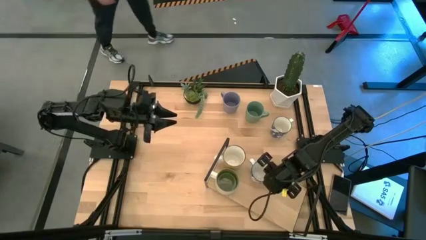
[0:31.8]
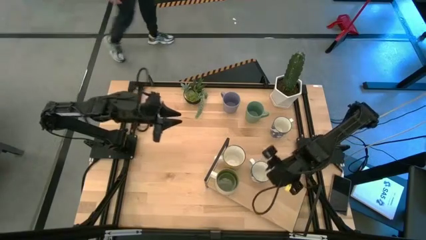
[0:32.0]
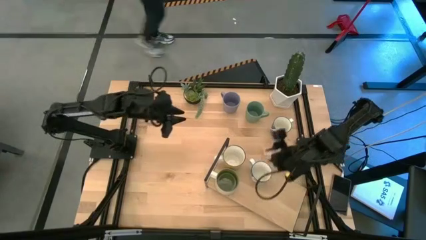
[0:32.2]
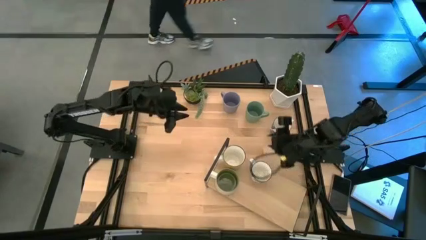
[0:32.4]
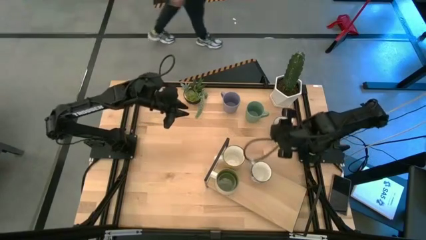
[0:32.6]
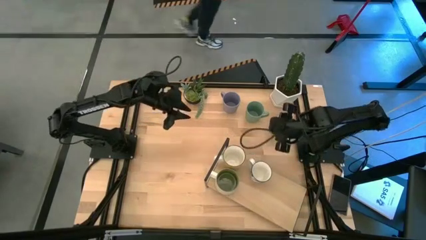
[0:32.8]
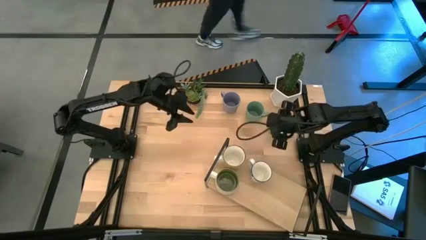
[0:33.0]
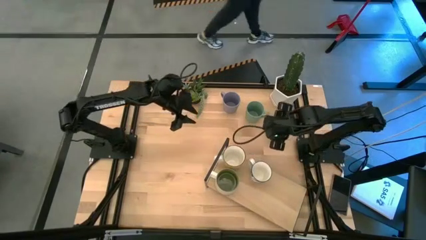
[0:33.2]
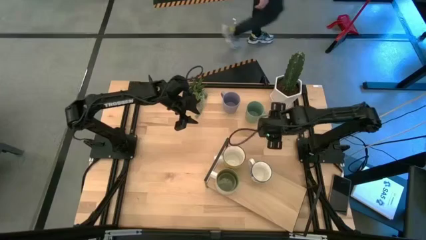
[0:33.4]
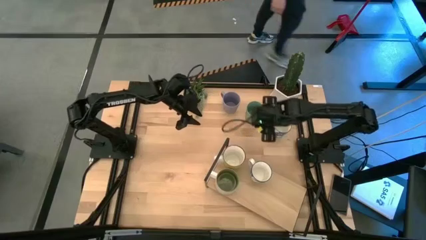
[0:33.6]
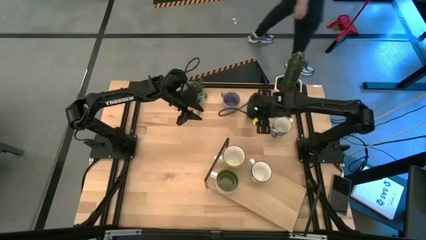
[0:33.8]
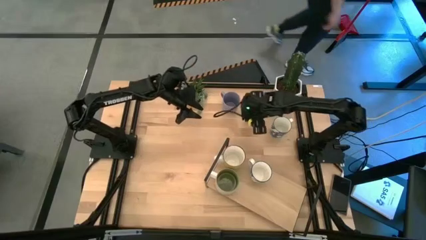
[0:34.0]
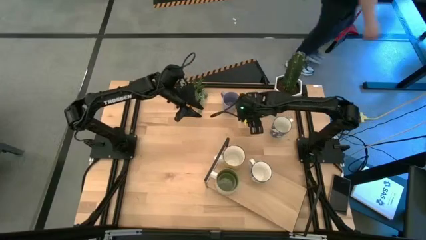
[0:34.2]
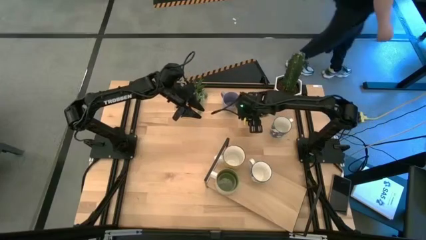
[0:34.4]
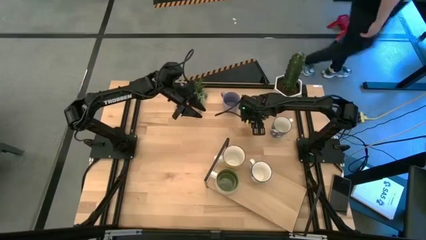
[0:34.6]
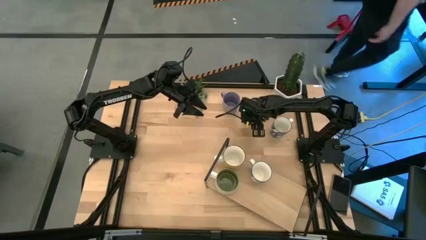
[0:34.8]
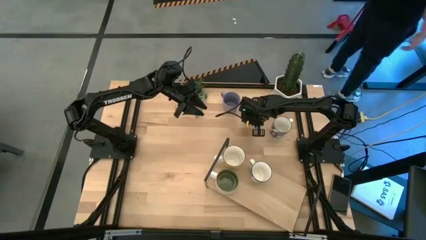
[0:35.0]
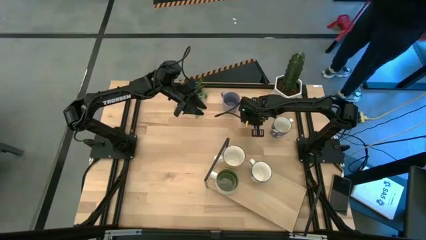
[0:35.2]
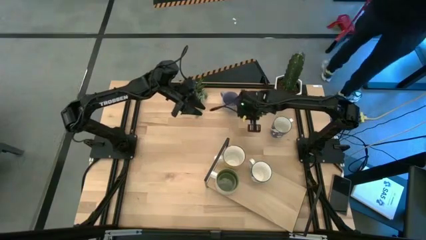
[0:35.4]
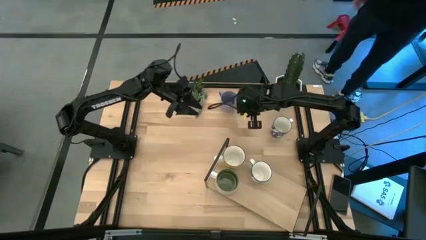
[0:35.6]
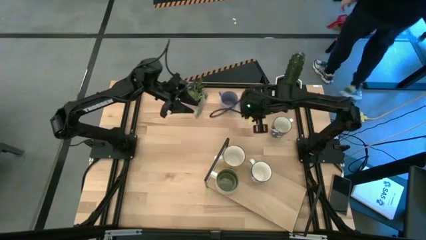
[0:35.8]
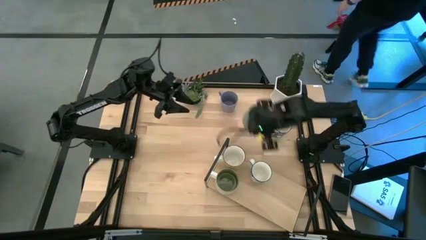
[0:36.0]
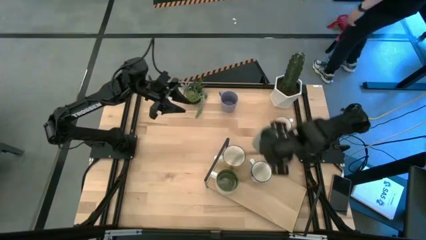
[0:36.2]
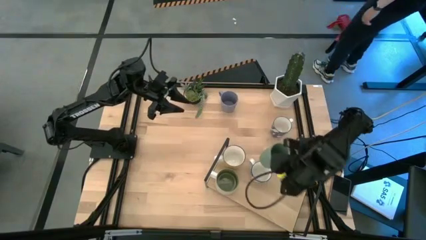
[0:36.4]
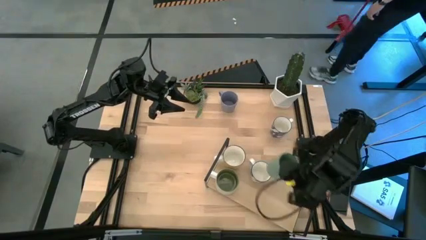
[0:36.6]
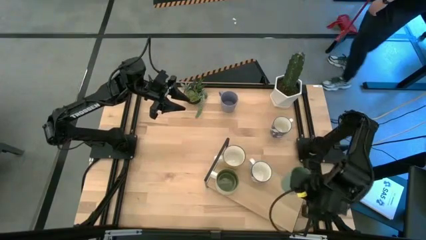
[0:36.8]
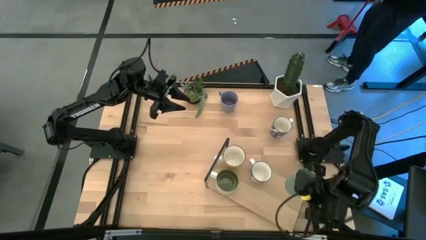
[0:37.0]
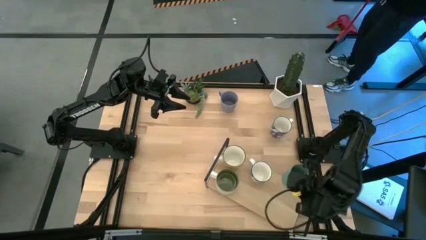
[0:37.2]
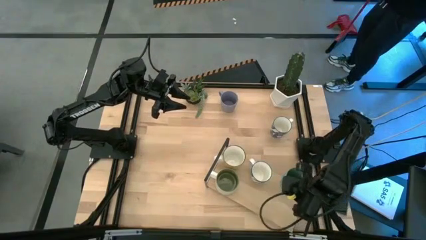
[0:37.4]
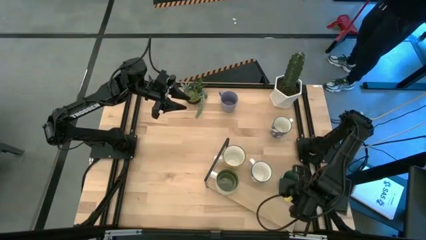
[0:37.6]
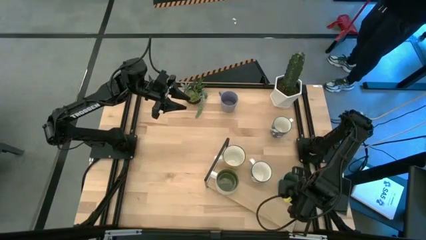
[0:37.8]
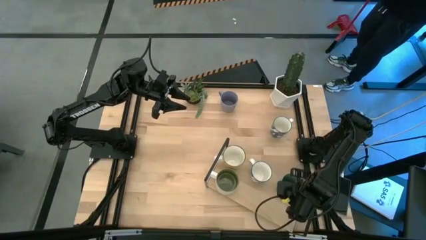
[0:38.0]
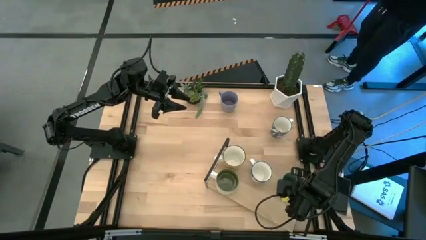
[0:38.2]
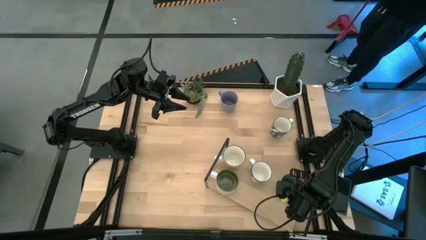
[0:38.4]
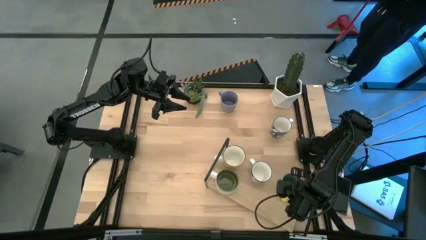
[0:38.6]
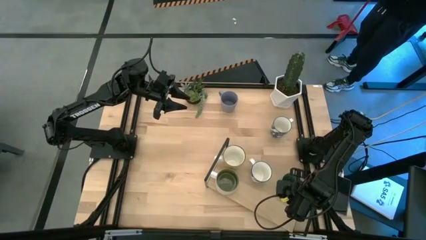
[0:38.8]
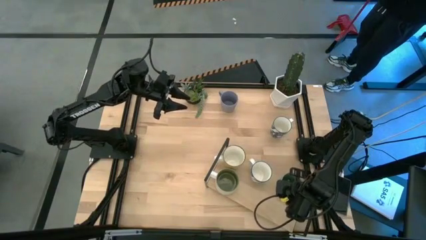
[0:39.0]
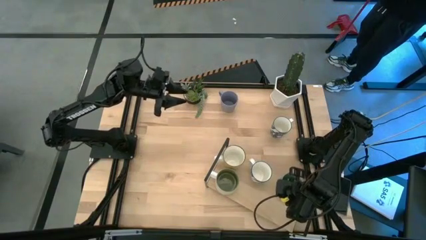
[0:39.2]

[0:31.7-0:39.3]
Task: Place coffee mugs
Put the green mug on the shelf

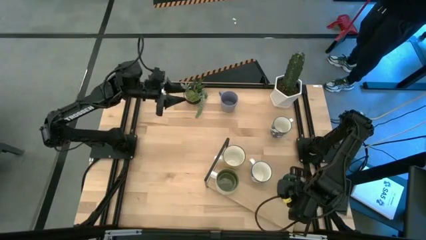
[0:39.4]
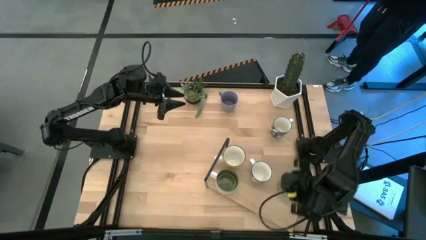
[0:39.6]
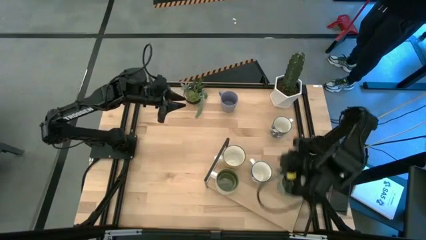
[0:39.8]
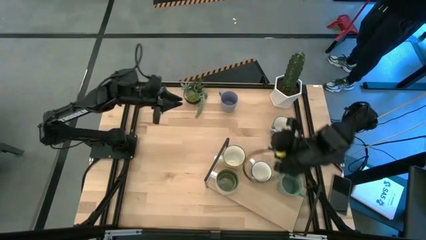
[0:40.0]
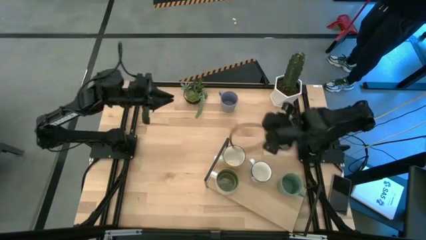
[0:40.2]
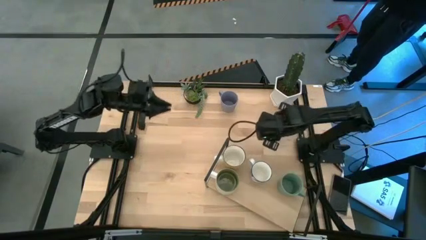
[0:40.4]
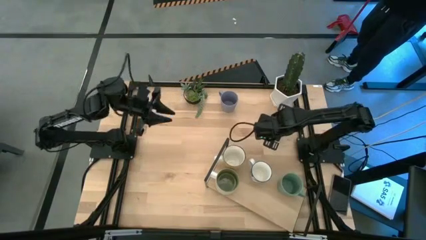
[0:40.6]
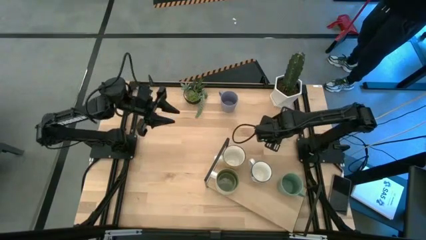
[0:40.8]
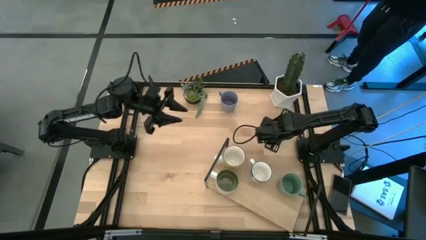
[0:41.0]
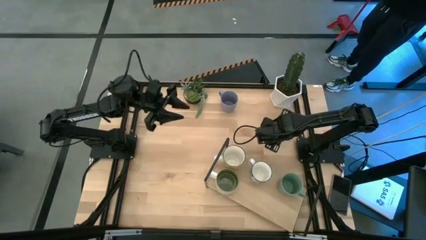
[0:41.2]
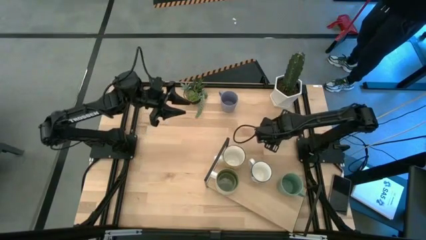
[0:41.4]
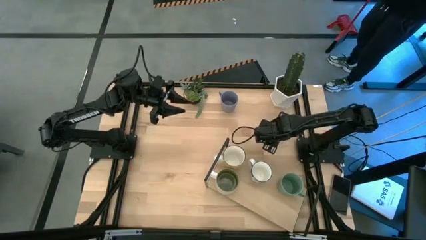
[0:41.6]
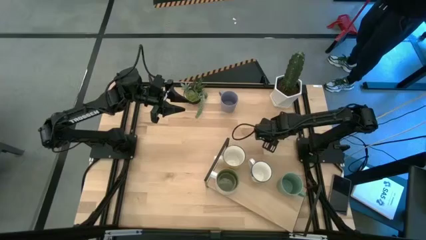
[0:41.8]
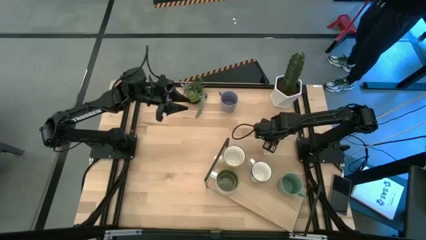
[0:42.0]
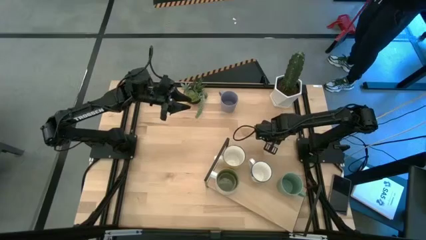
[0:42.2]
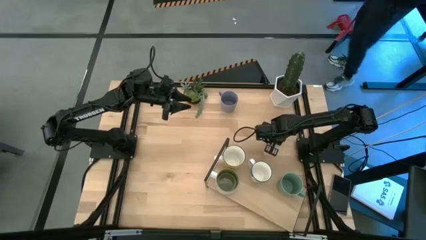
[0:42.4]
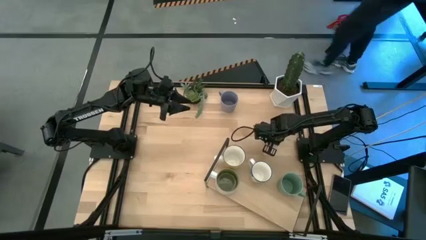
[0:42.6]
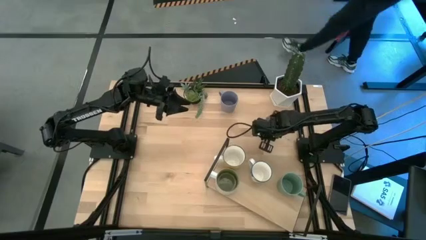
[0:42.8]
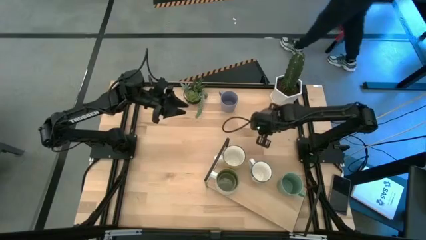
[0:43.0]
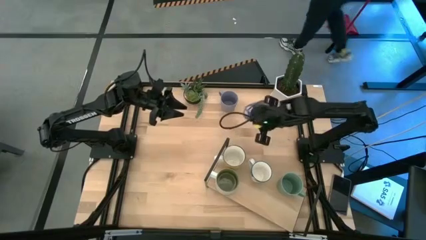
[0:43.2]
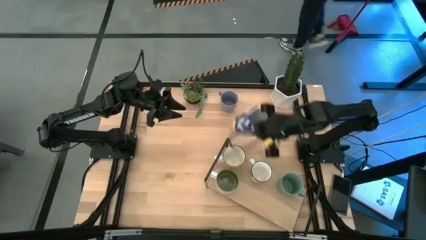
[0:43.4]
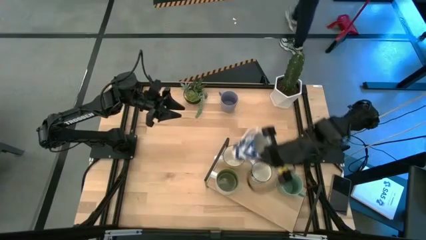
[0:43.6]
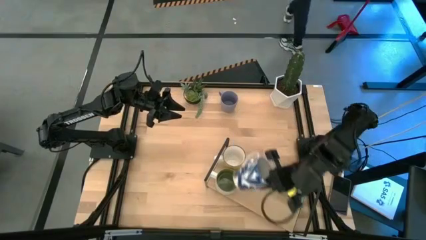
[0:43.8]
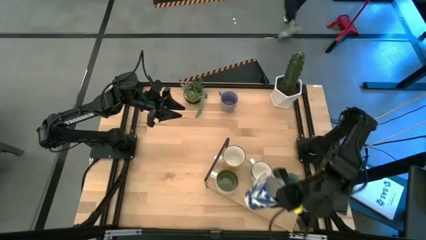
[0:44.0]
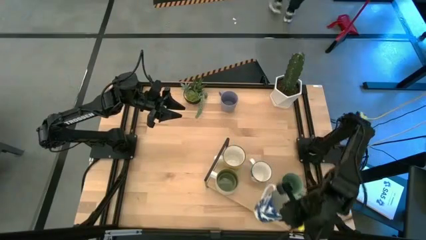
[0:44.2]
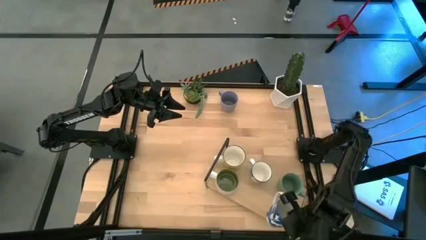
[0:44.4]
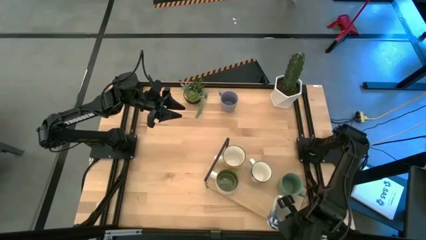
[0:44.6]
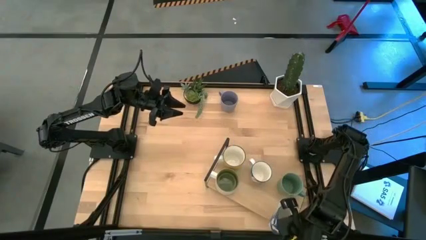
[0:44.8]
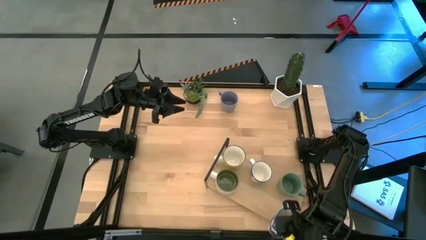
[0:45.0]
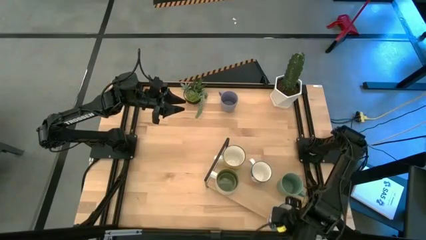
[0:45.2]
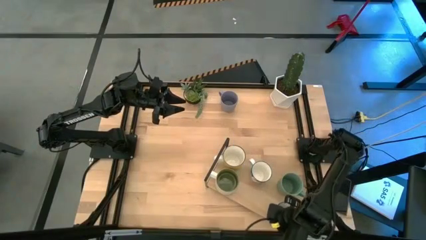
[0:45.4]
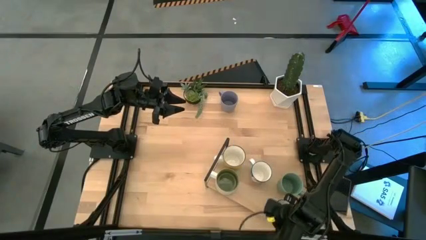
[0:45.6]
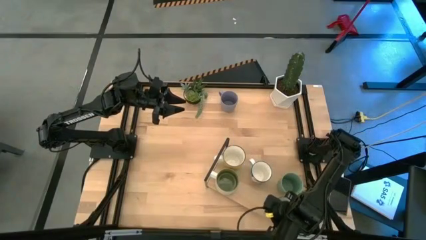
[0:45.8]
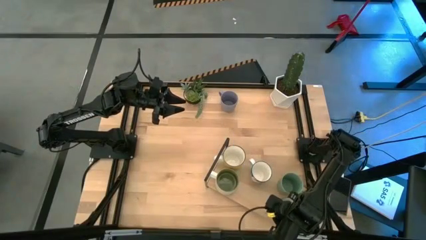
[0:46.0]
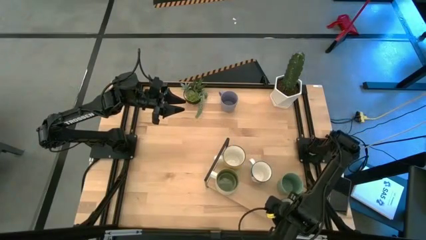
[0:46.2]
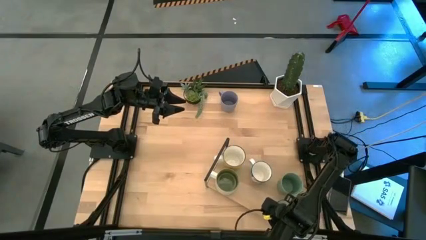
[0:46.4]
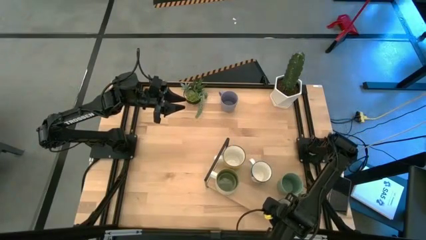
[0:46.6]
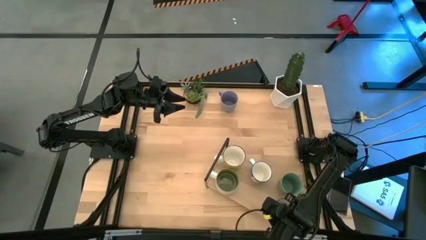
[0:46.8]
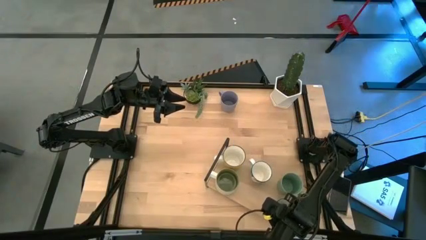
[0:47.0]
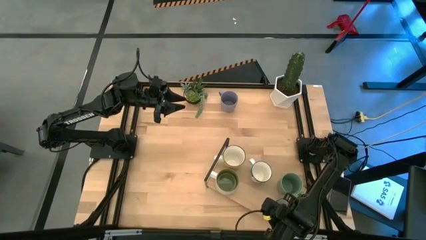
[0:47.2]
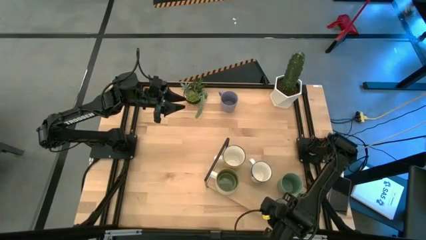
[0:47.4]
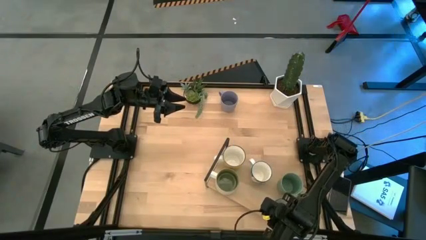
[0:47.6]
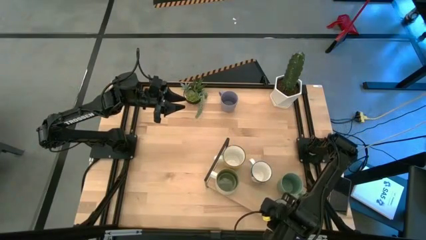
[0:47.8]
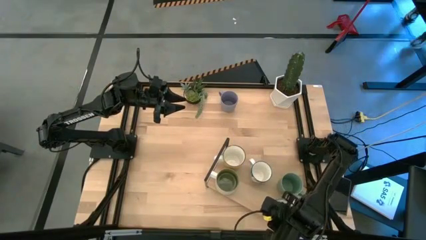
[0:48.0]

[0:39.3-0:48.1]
Put the blue pattern mug on the shelf
